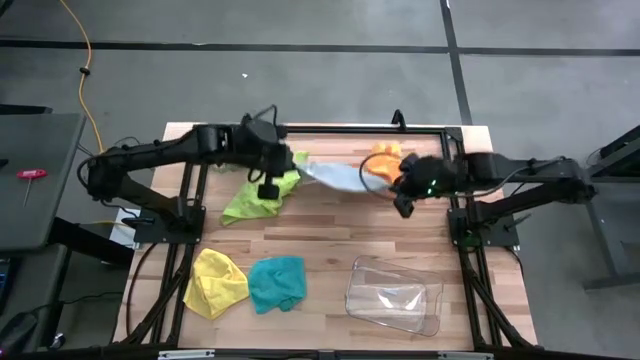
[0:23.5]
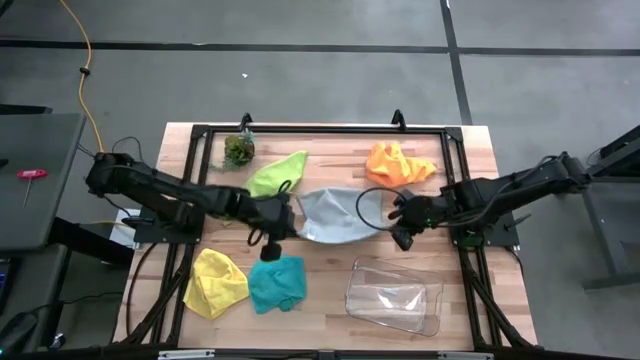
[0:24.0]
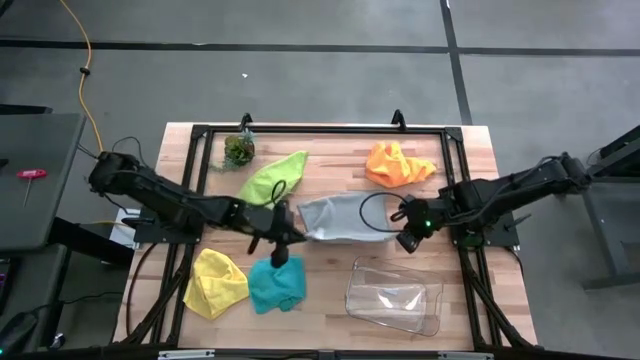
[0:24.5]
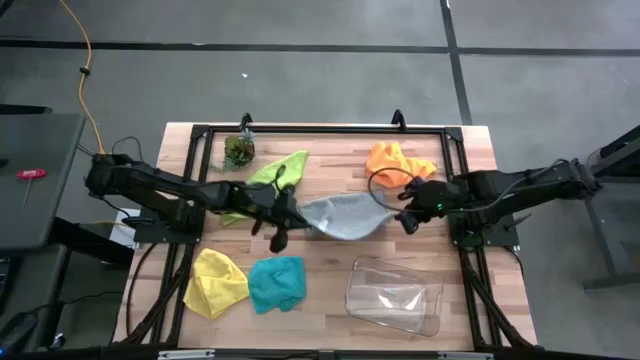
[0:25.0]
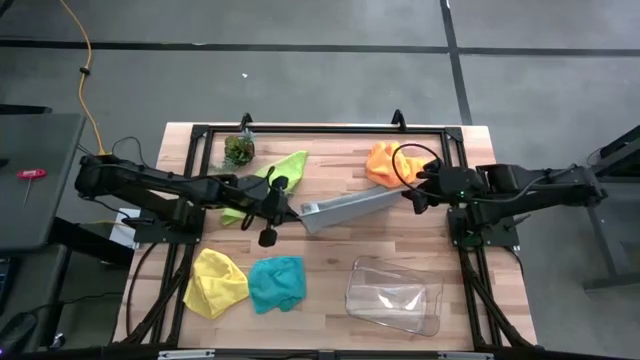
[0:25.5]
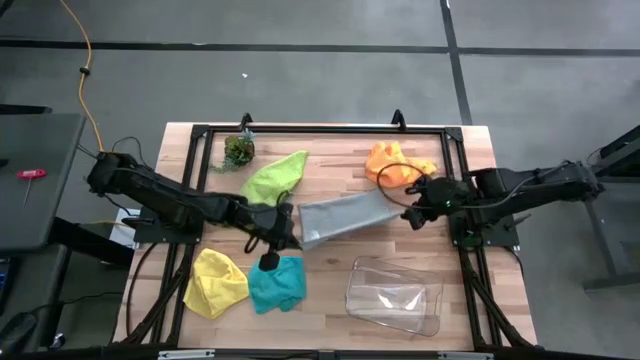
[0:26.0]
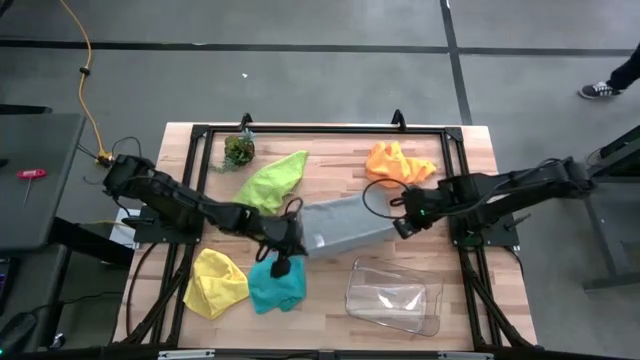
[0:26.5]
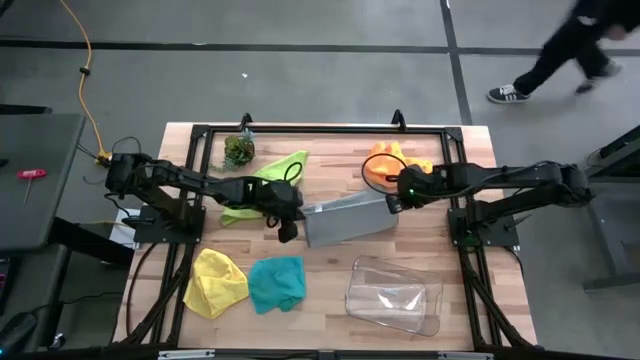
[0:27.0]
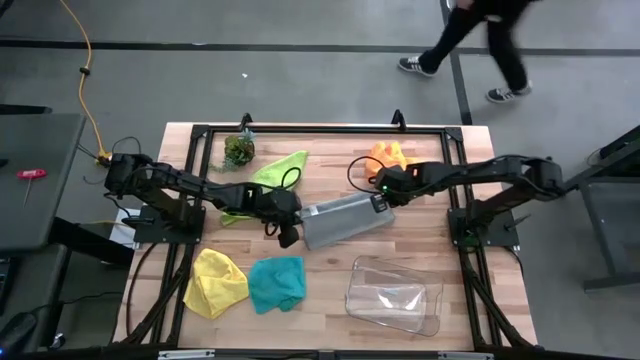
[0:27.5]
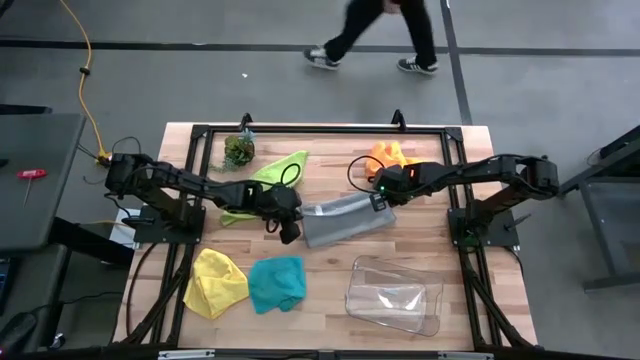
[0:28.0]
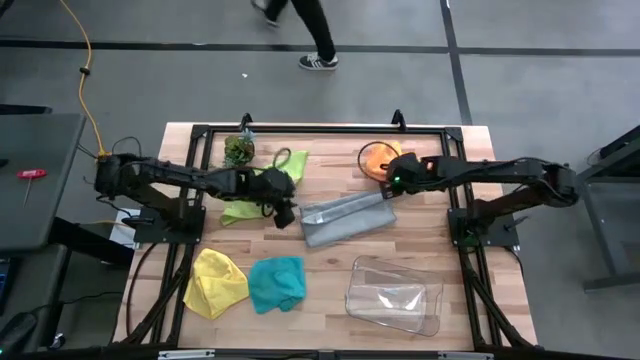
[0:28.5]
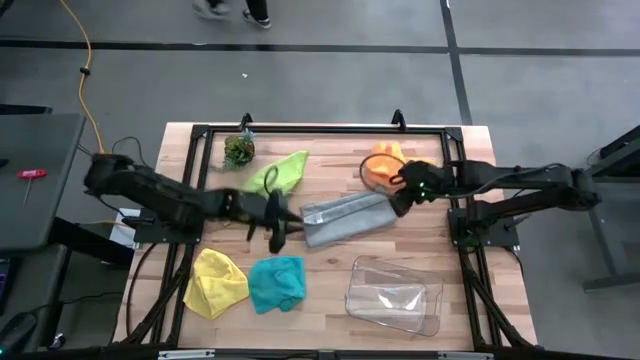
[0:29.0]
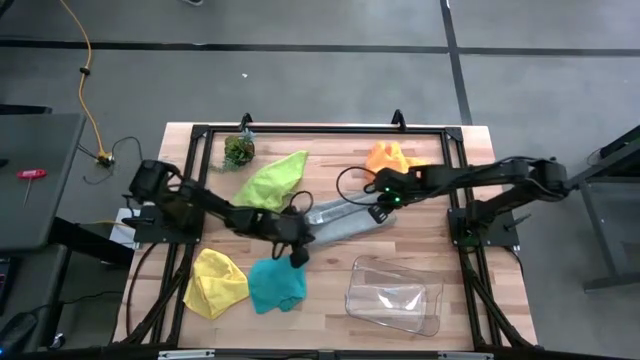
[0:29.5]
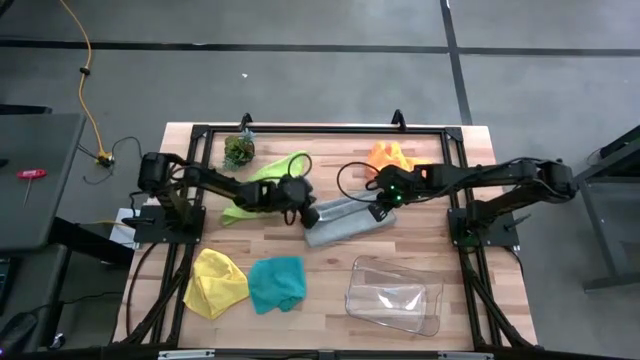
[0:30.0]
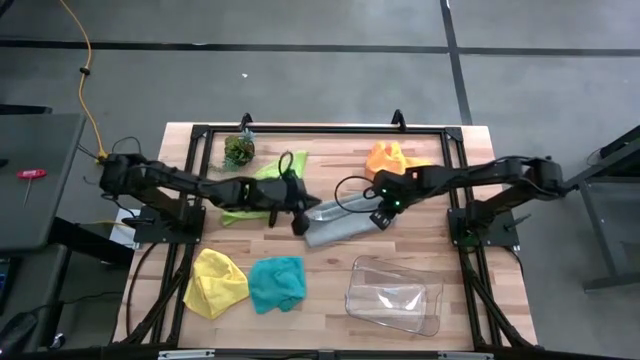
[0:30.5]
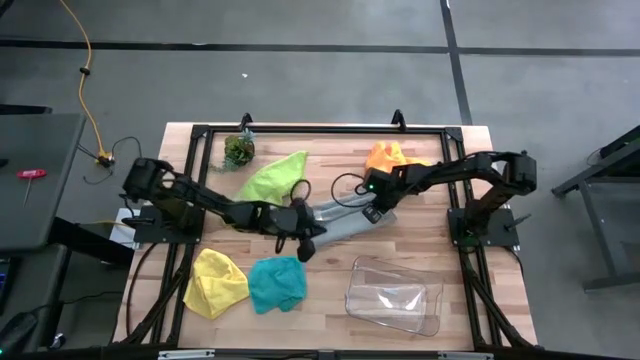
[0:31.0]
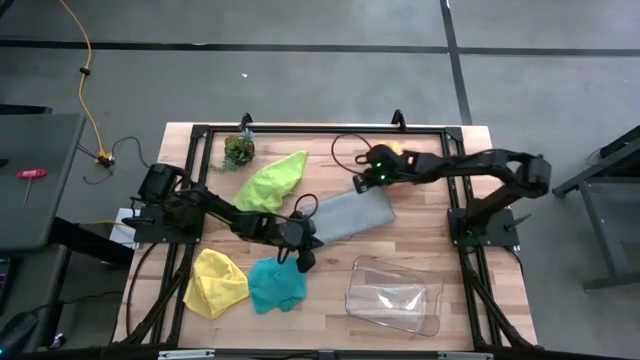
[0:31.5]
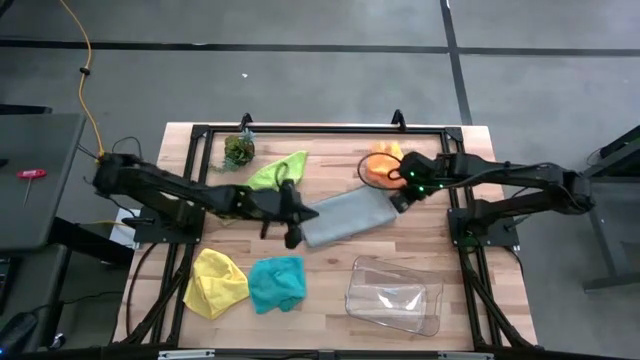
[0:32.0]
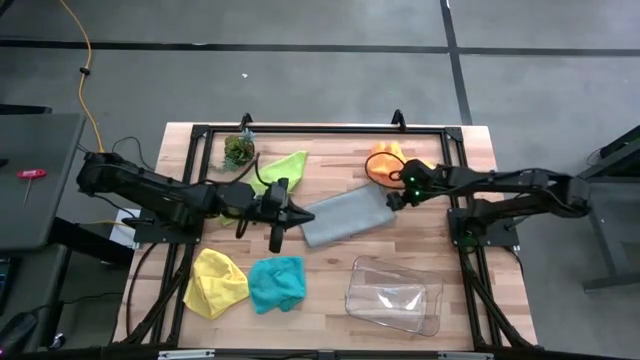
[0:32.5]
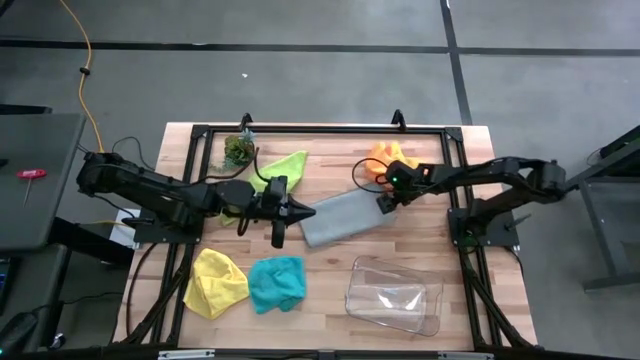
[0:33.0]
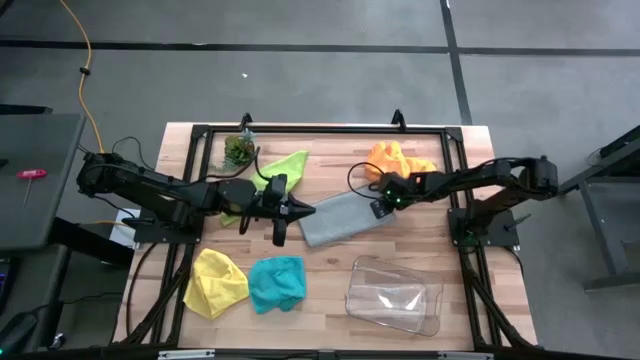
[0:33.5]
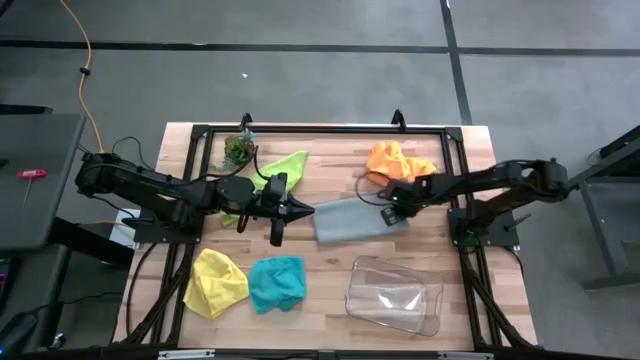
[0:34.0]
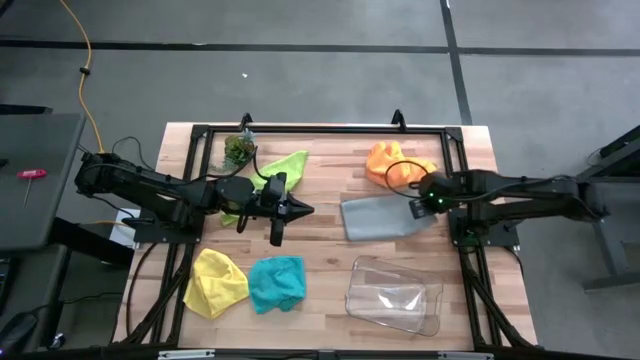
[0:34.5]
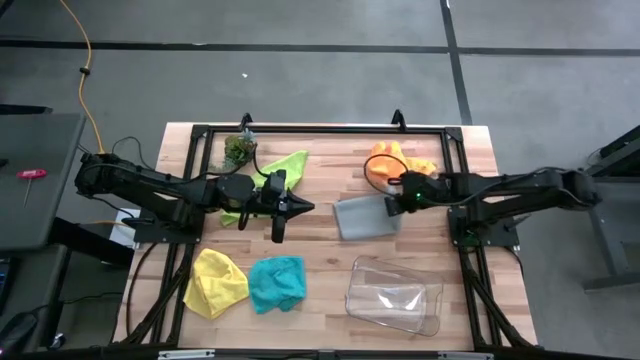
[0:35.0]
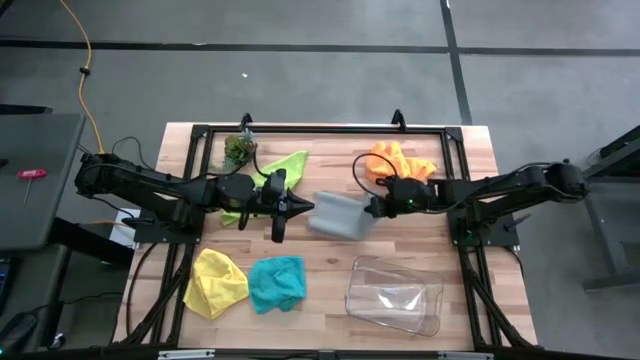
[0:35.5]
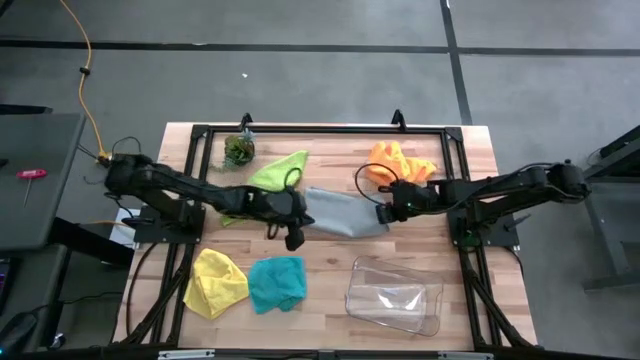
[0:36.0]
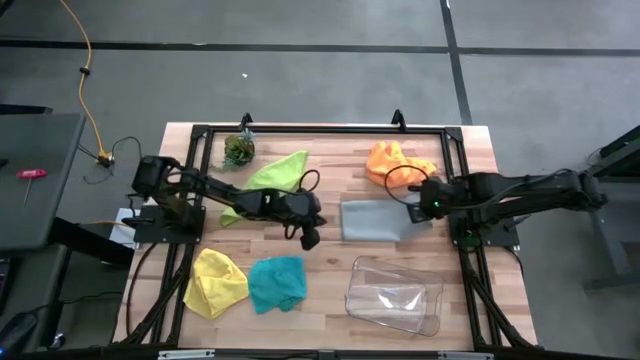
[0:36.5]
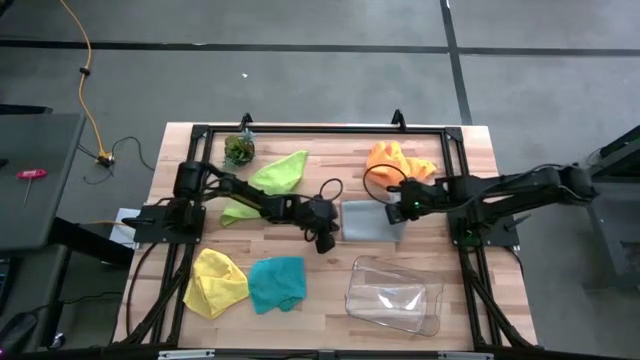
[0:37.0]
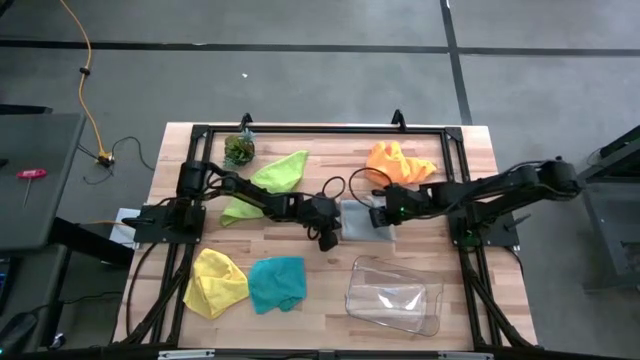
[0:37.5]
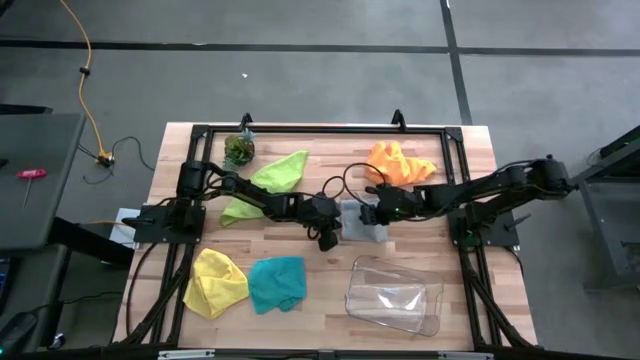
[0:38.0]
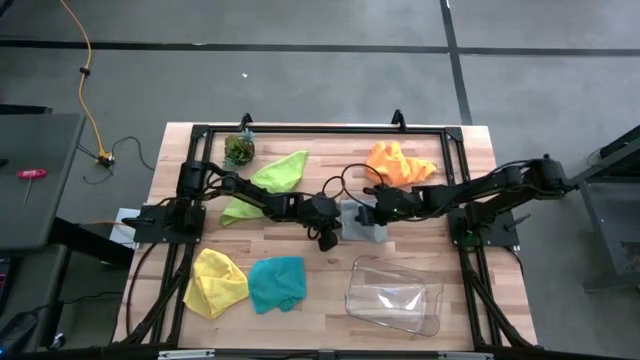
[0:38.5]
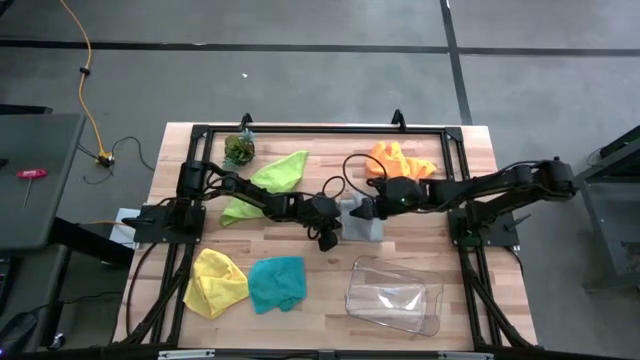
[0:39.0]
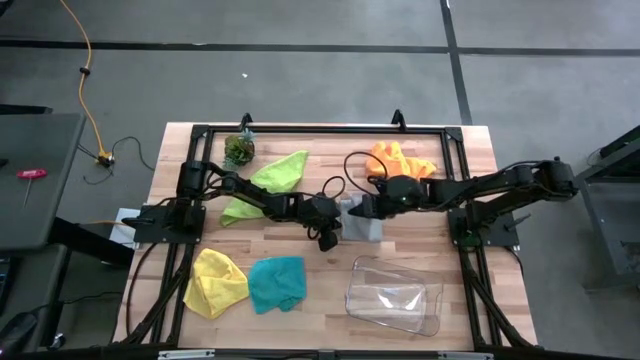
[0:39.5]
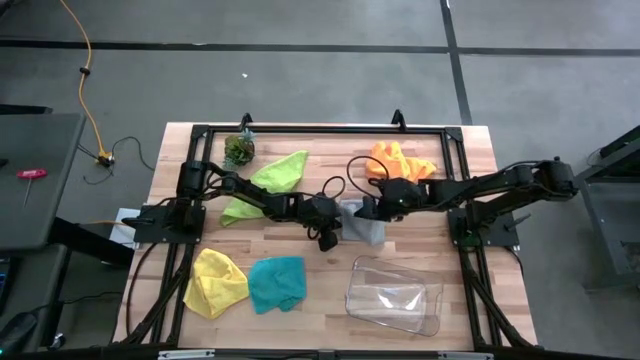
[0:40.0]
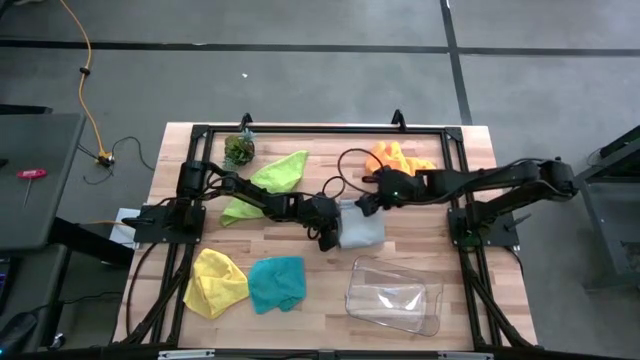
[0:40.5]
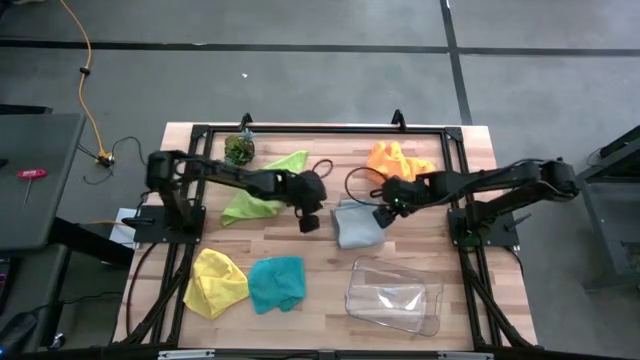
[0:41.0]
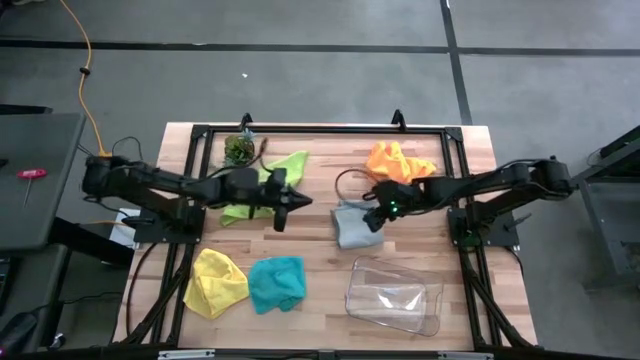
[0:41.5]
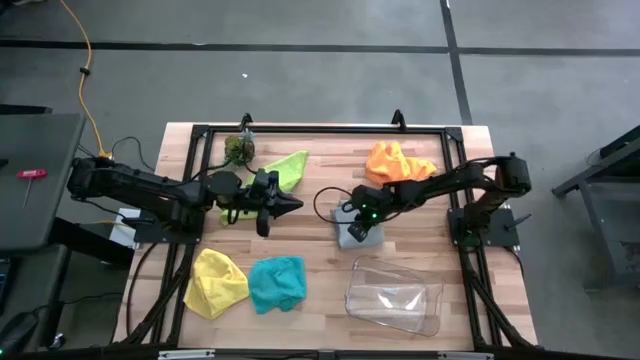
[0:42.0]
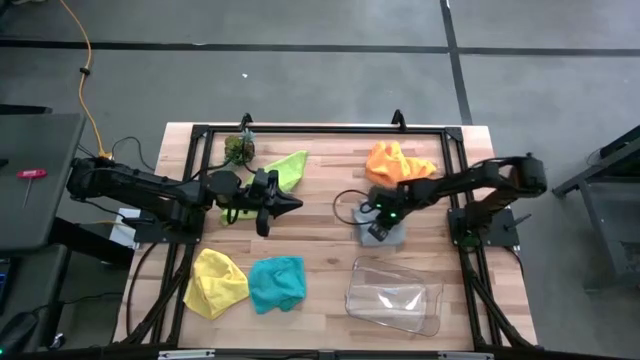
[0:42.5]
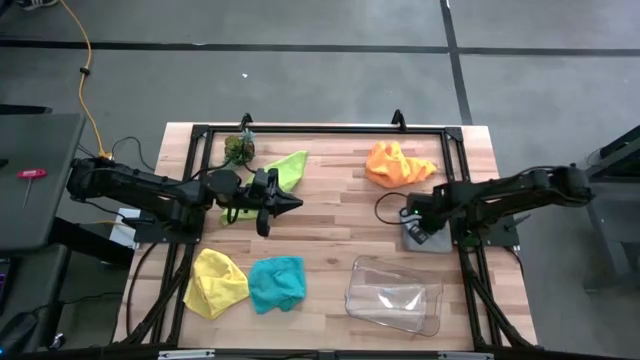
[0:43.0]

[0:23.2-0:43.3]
Task: Fold microfiber towels
Fold the gray cloth

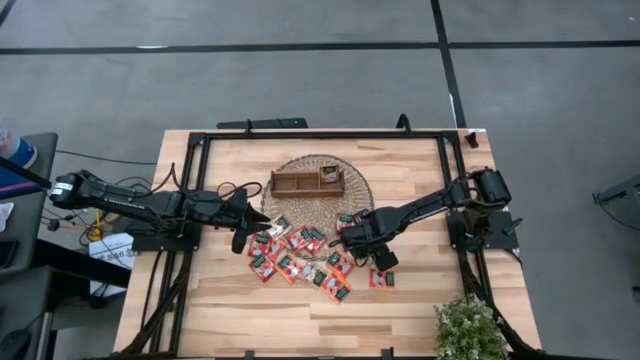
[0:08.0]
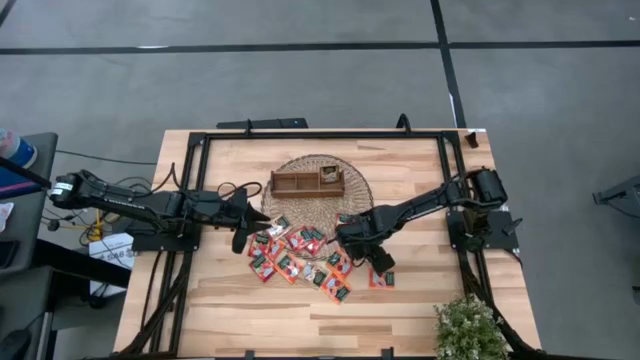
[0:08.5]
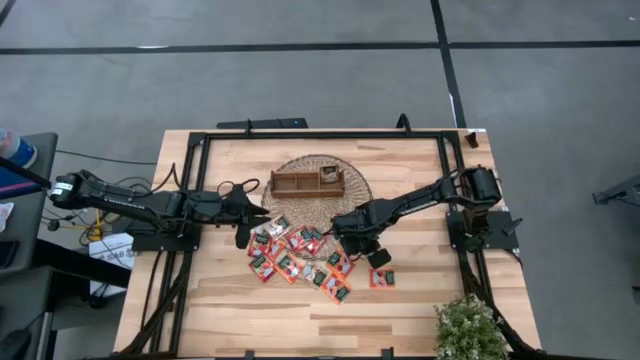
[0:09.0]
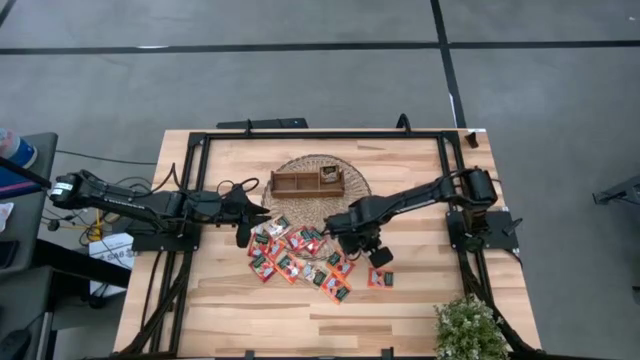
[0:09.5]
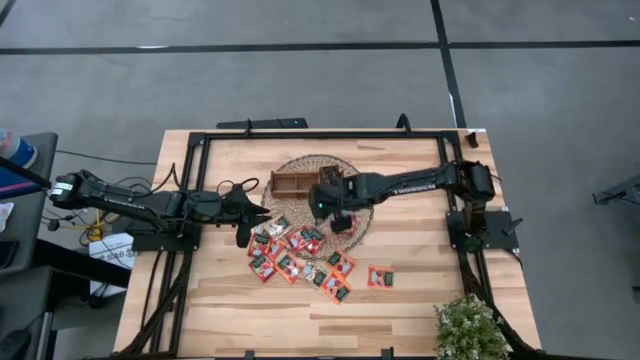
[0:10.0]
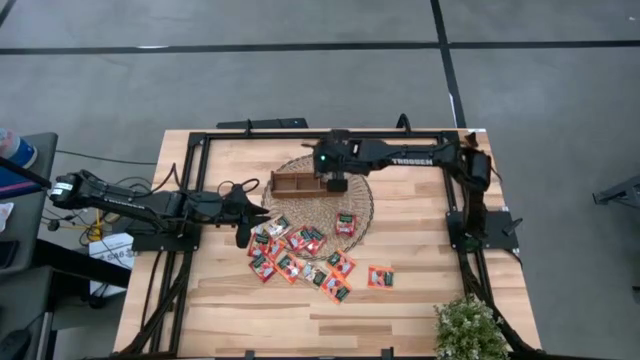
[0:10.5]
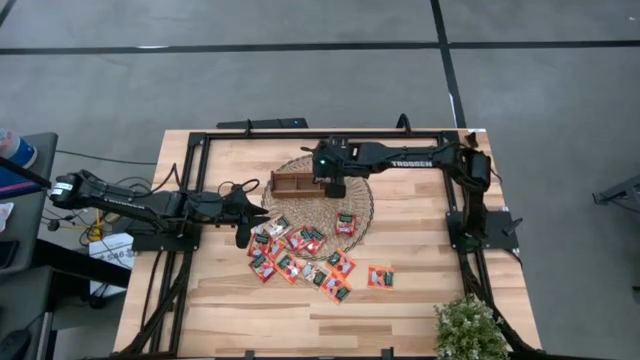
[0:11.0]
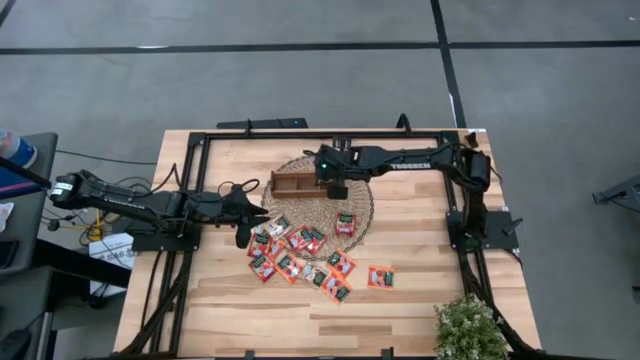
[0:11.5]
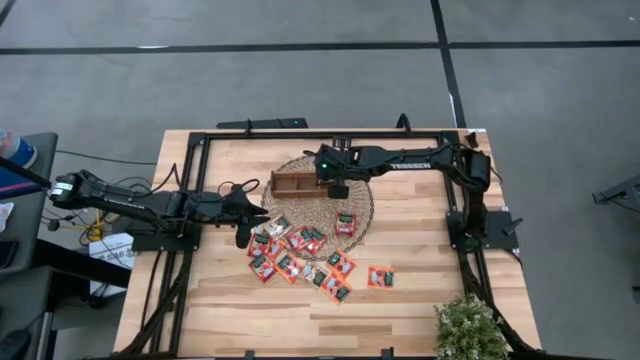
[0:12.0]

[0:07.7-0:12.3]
Task: Pick & Place Tea
Put the brown tea bag into the right section of the wooden organizer
